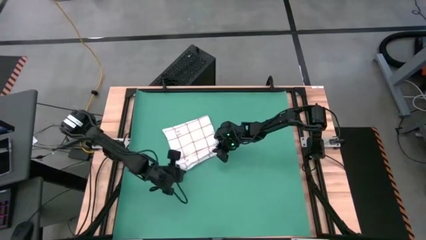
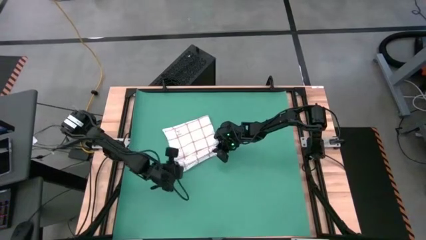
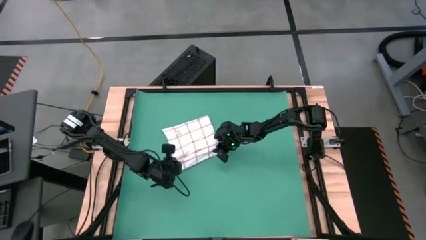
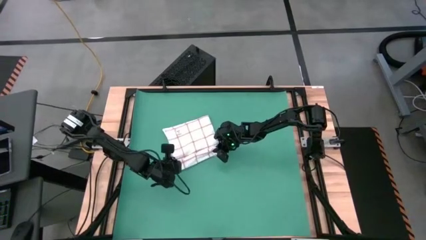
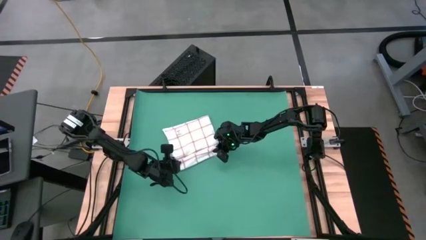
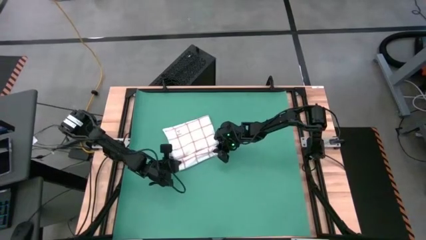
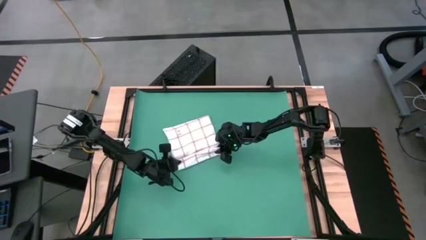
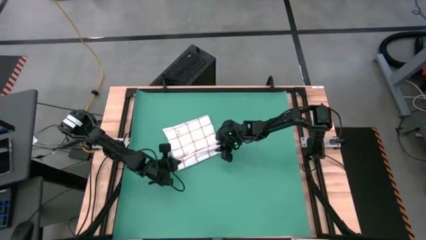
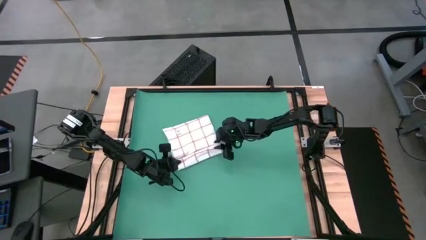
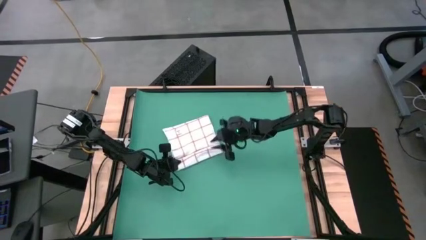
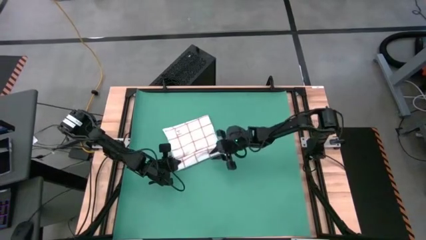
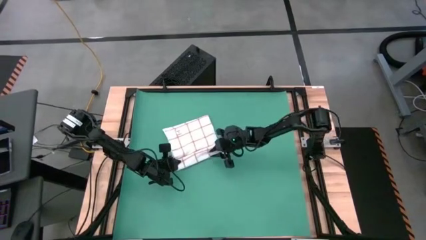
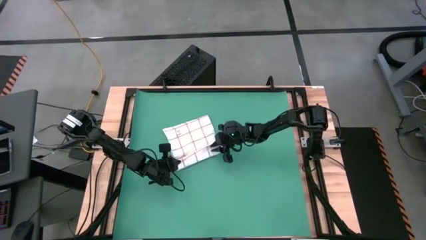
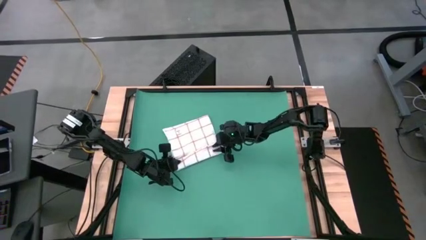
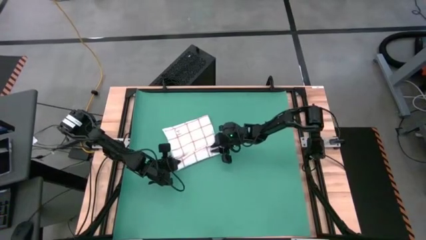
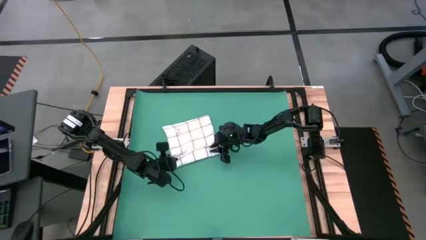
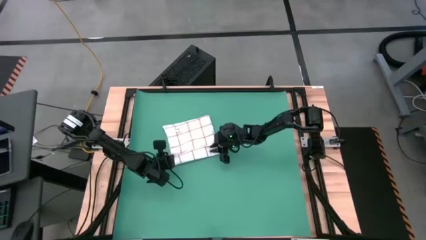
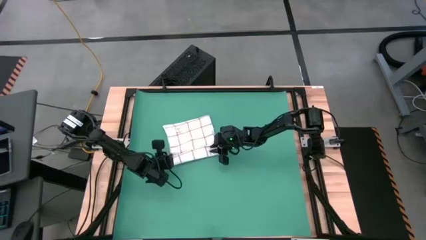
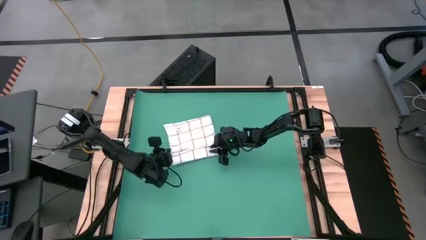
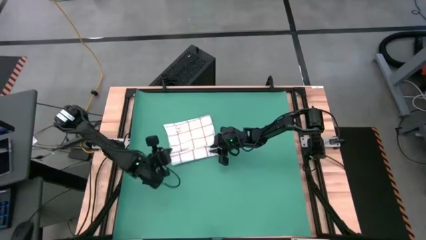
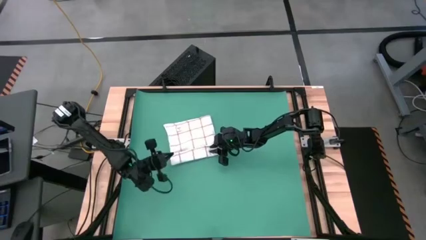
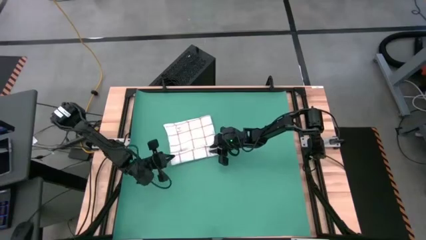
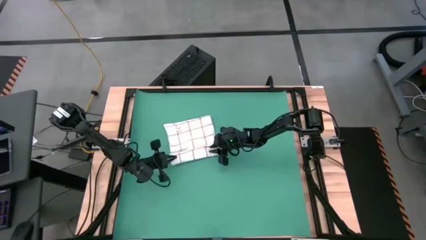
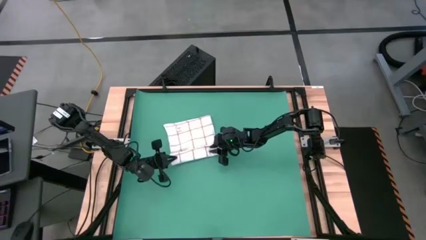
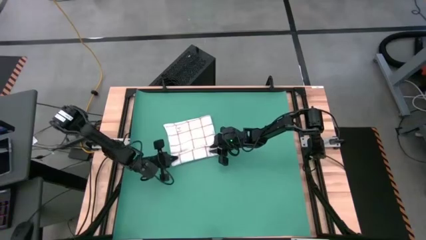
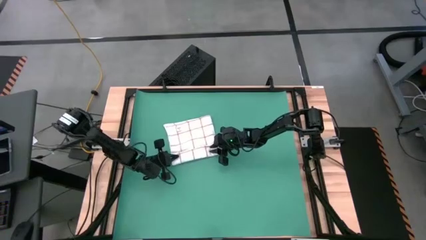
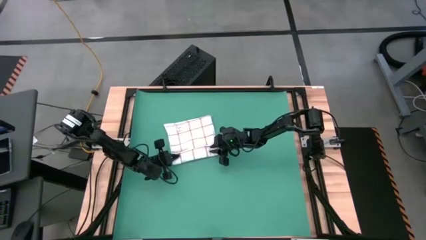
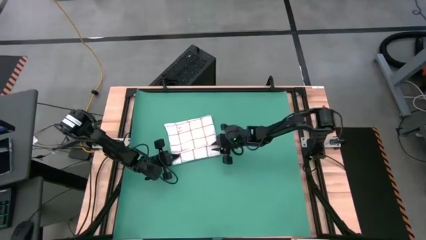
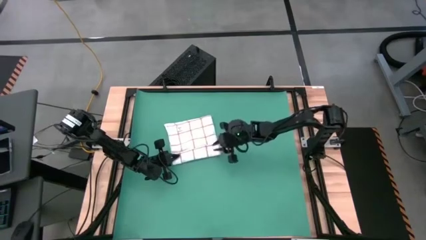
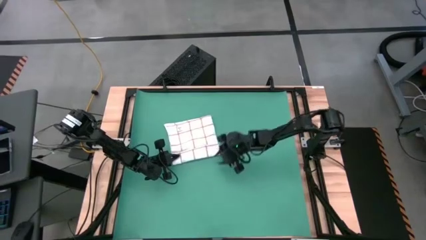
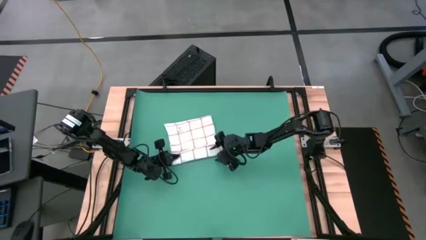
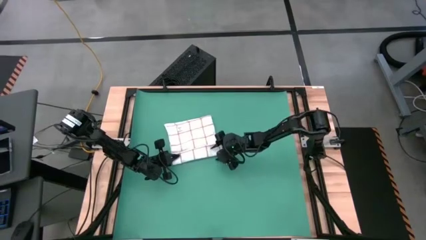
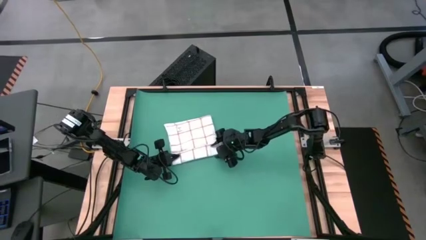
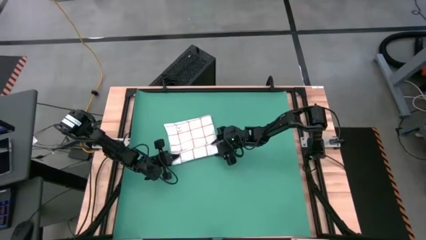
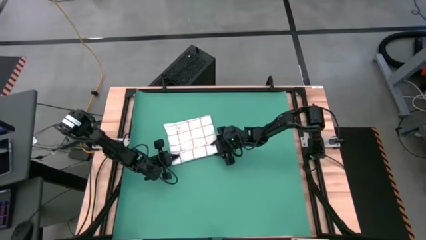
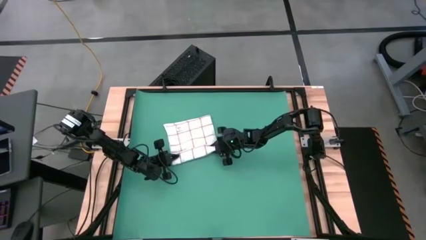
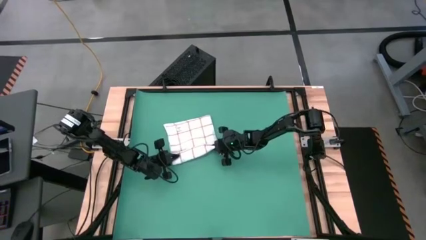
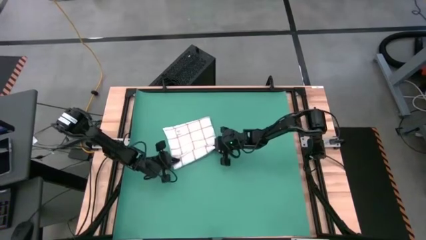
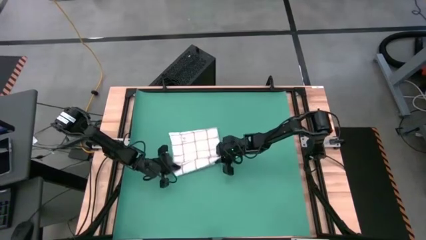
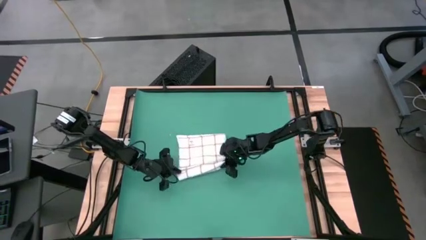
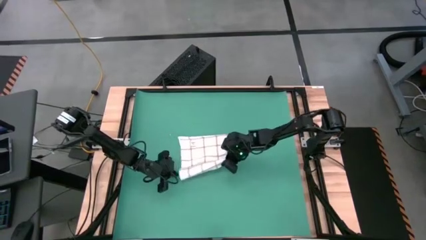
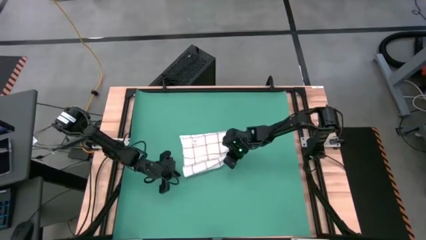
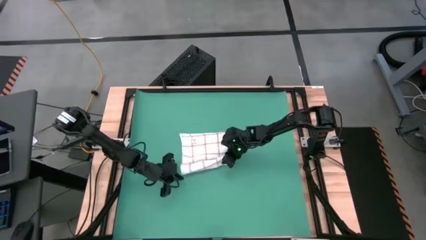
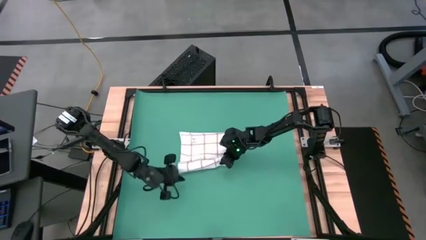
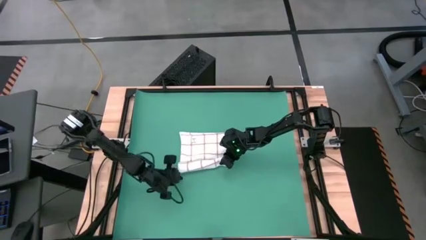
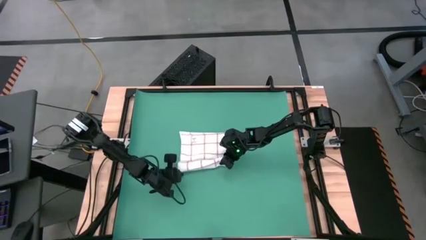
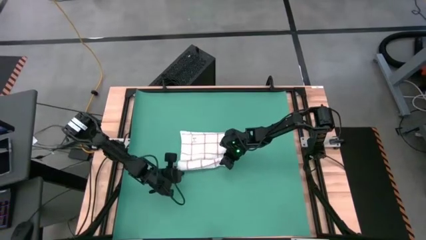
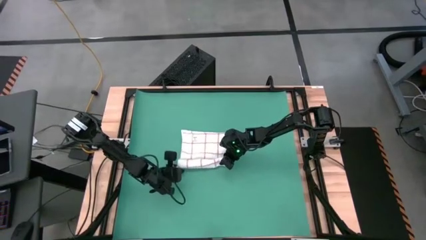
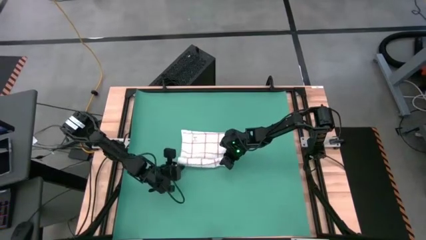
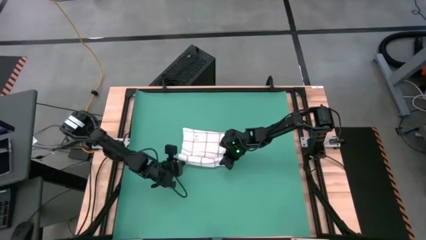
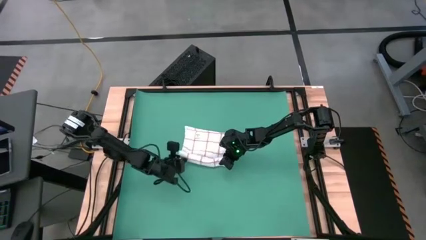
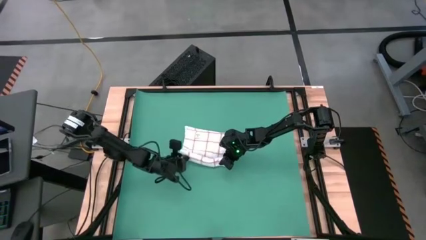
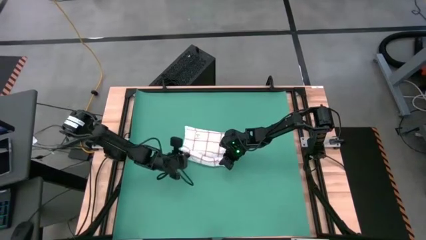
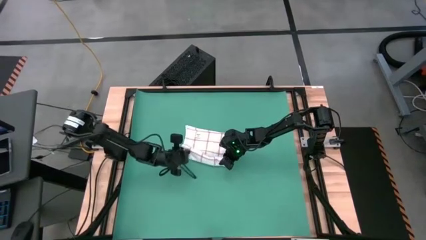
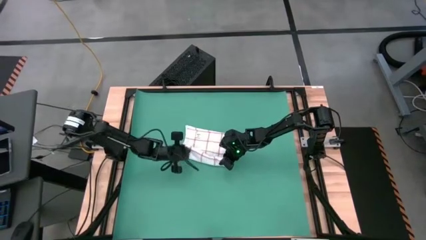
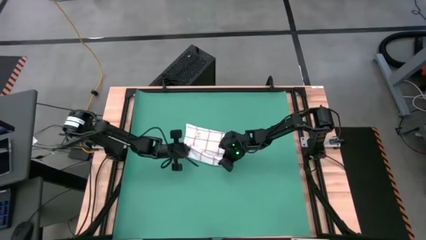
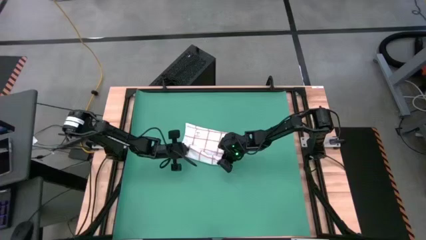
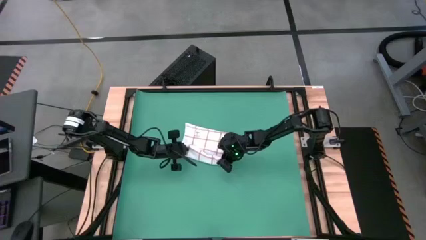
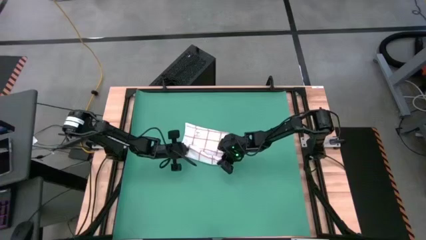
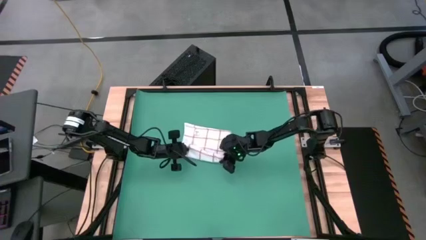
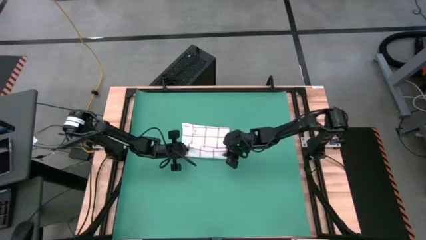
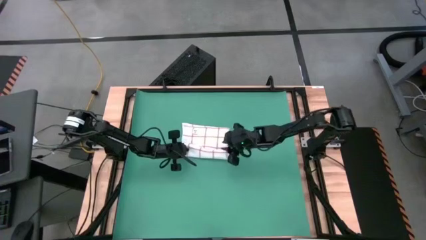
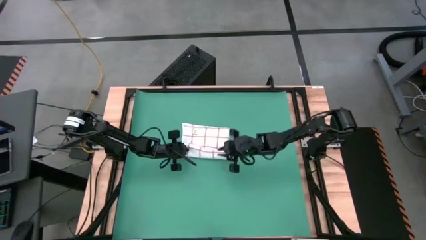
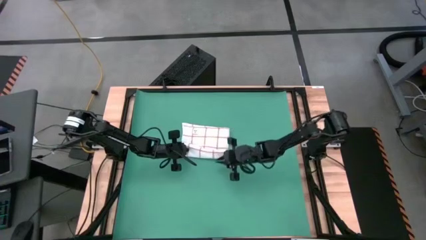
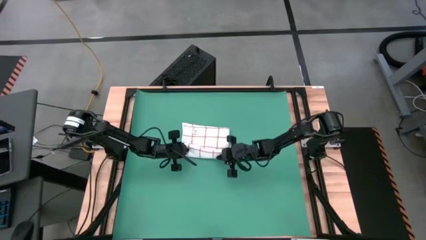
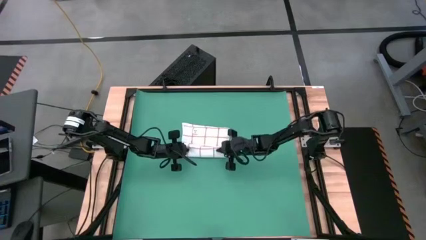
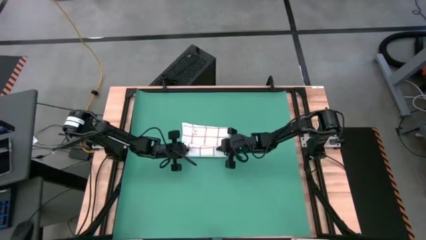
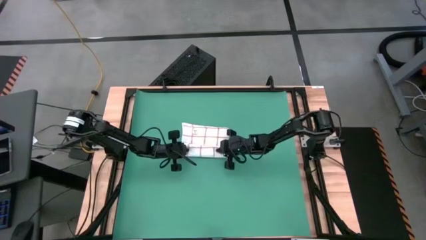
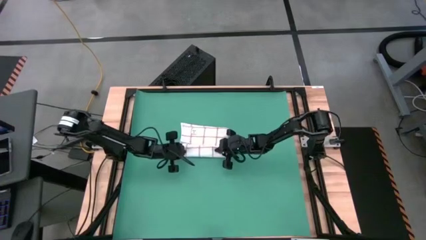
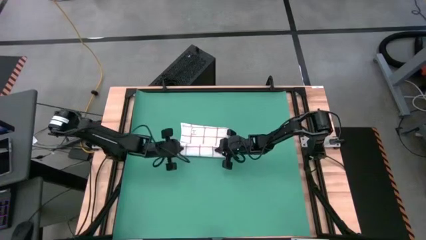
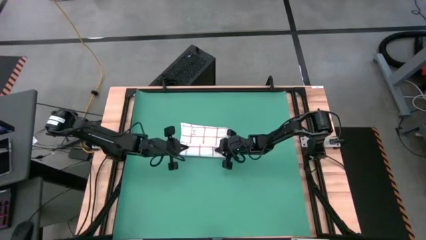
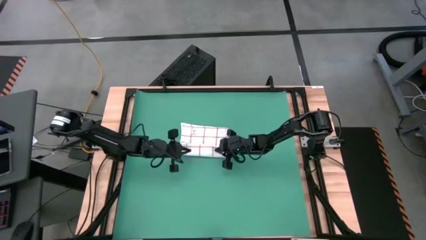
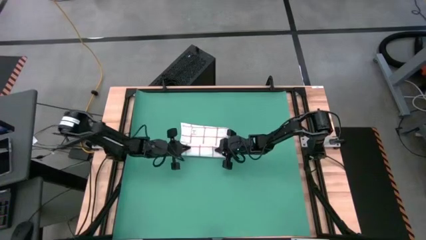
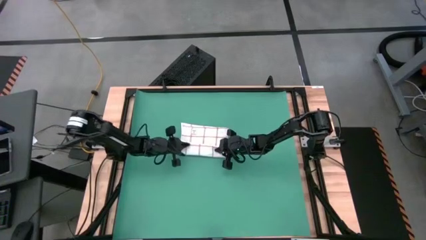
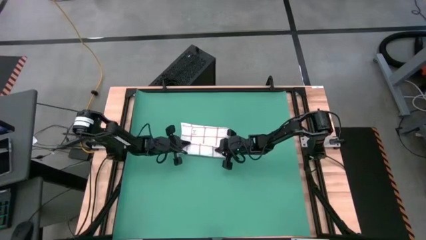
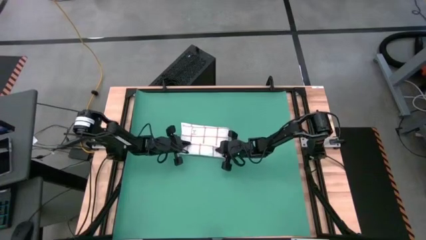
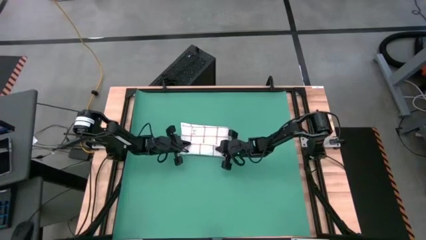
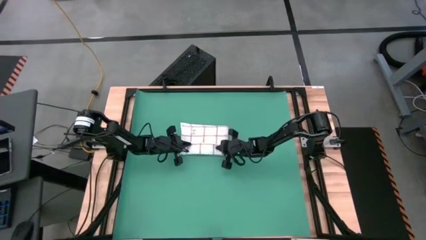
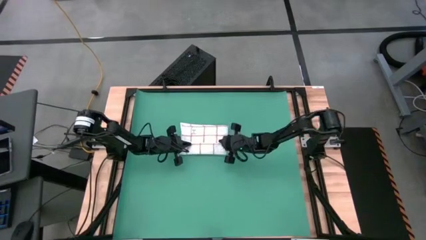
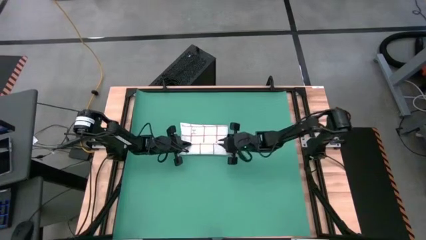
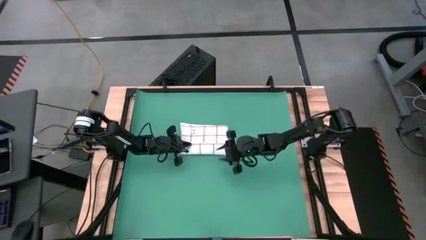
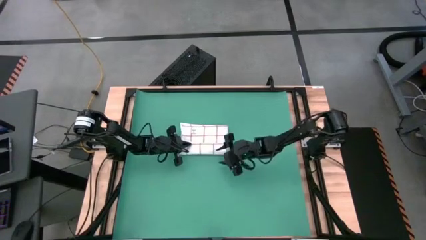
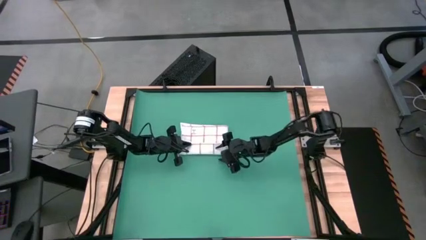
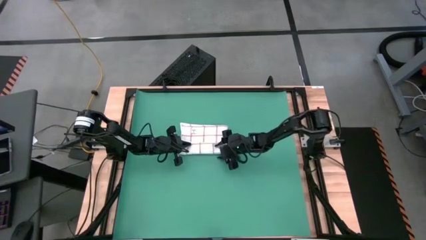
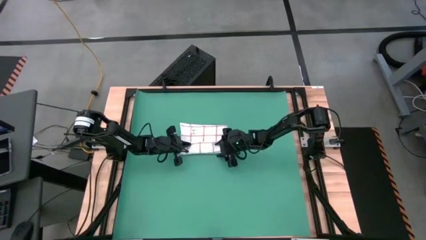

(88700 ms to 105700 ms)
Task: Roll towel
Roll the white towel
